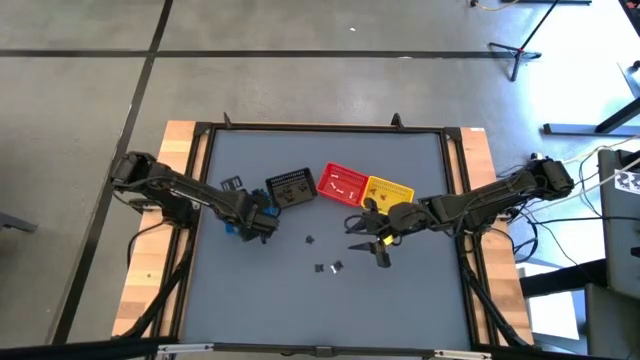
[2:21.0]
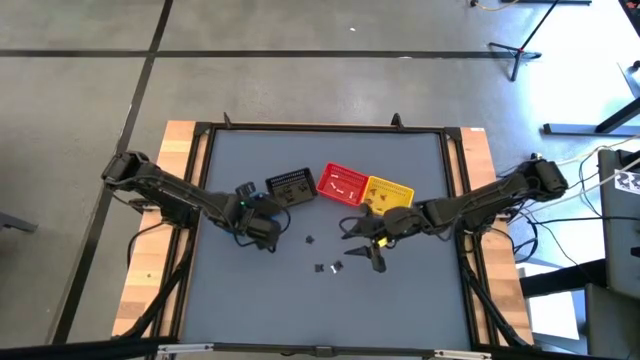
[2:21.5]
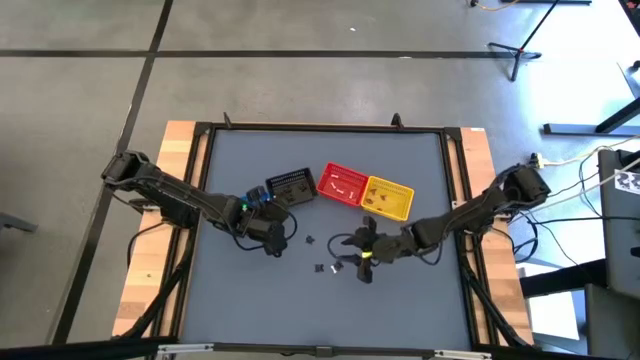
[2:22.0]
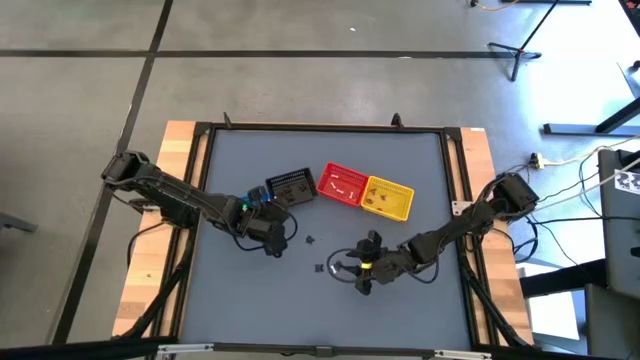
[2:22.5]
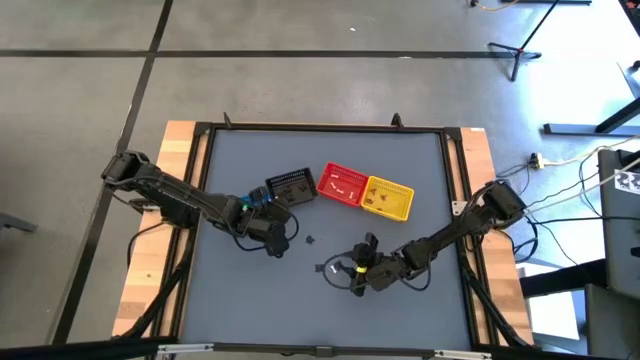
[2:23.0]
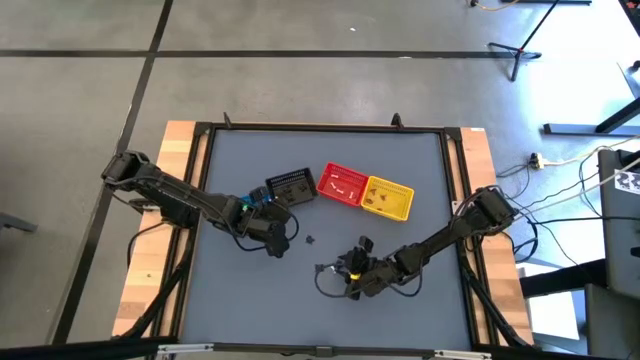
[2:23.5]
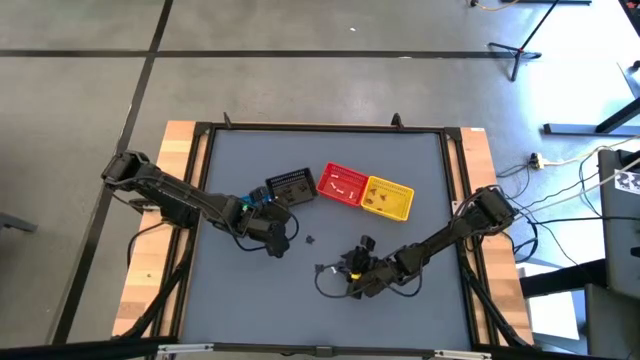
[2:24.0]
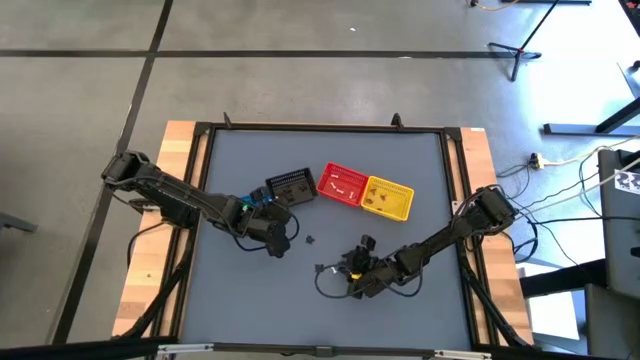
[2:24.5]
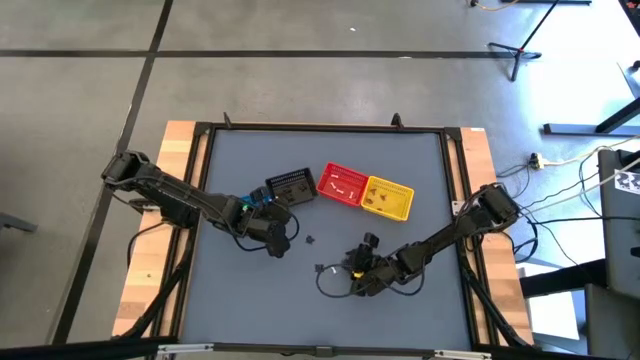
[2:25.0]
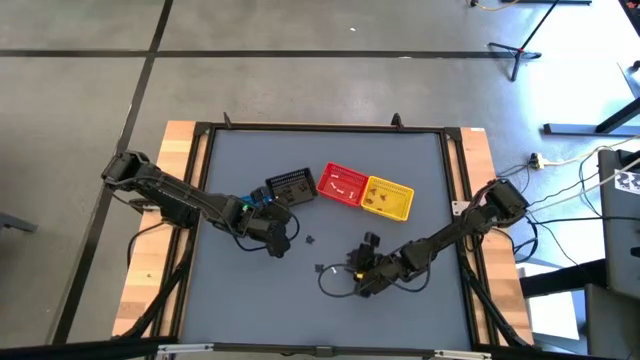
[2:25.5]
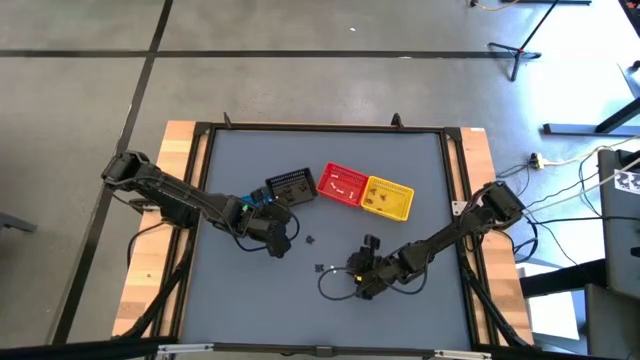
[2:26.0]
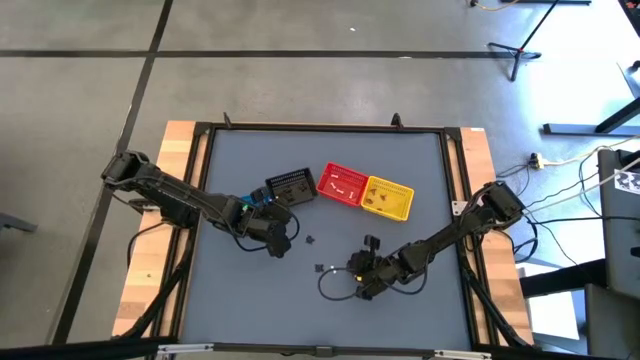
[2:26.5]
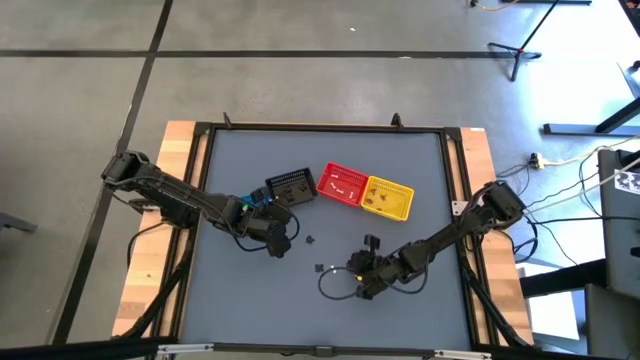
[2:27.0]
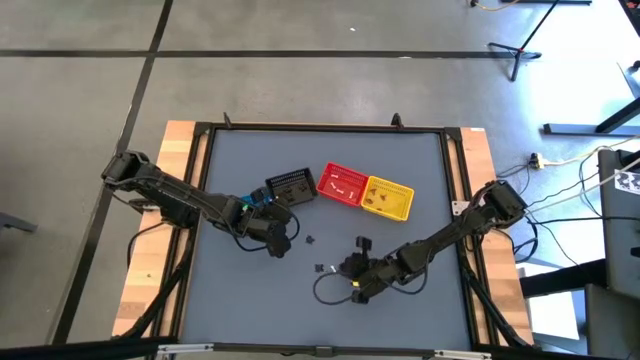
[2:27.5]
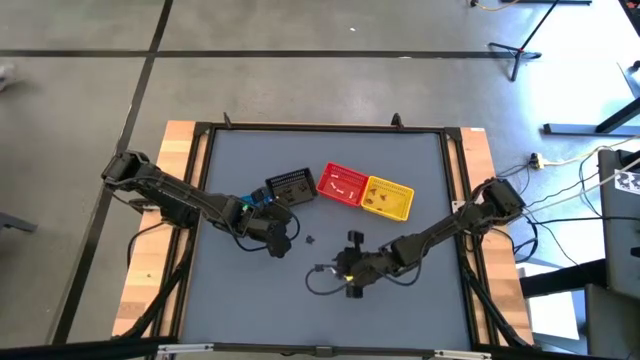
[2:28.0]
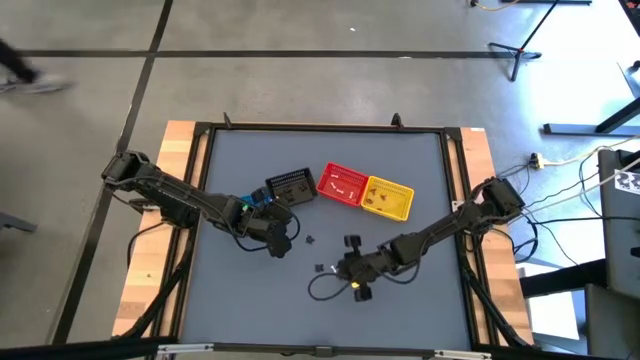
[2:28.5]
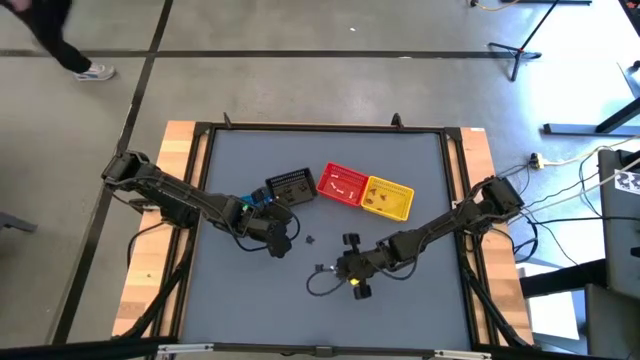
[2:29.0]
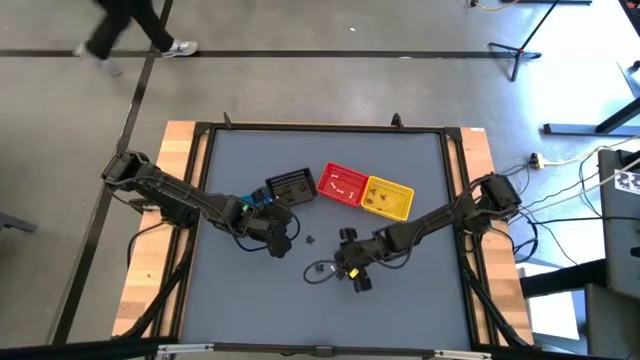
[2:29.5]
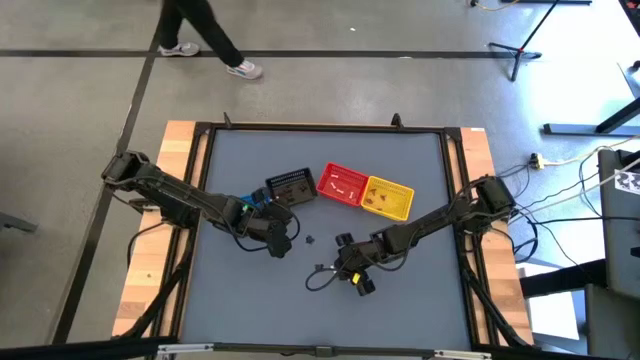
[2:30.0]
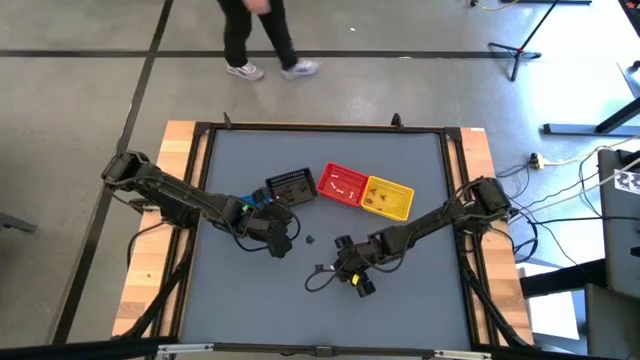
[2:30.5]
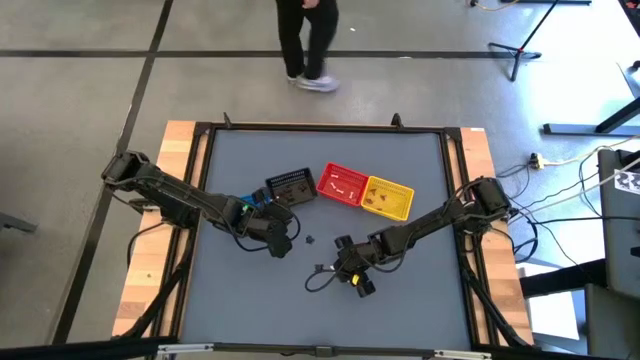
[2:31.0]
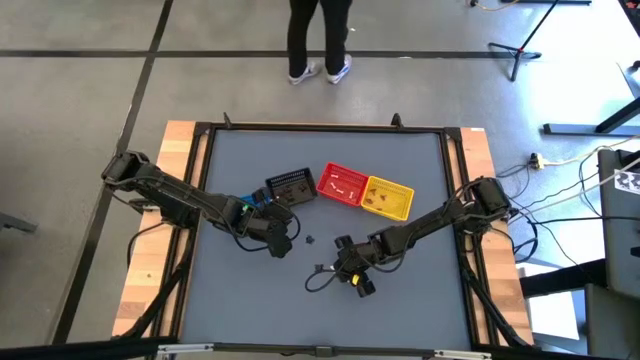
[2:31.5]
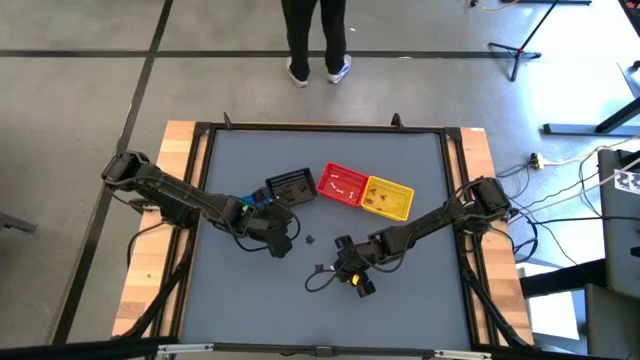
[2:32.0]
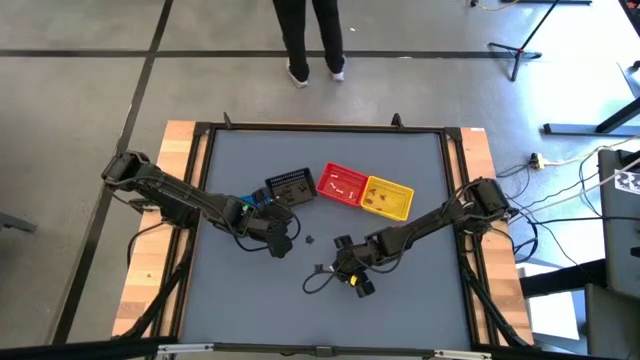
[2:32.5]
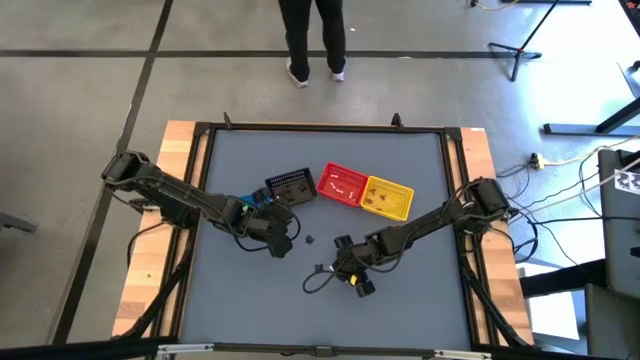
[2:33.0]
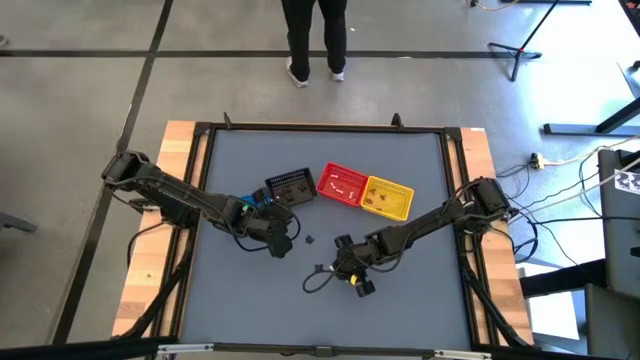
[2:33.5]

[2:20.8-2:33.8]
Task: Sort Halloween decoration
Put the black spider toy into the black bin
